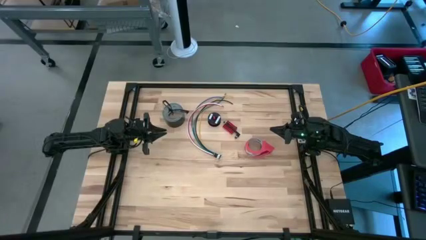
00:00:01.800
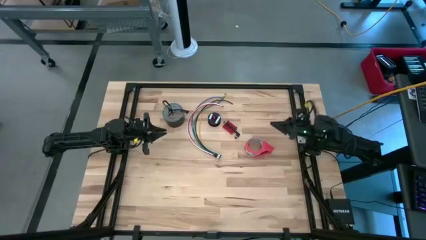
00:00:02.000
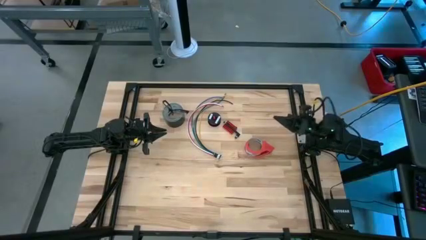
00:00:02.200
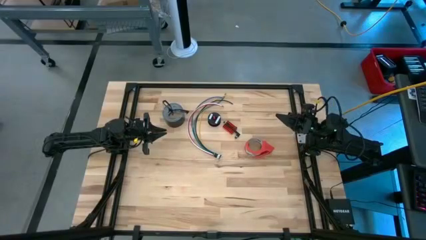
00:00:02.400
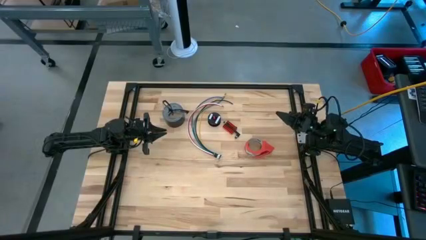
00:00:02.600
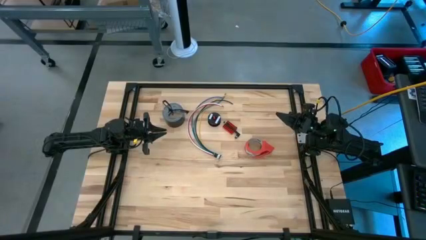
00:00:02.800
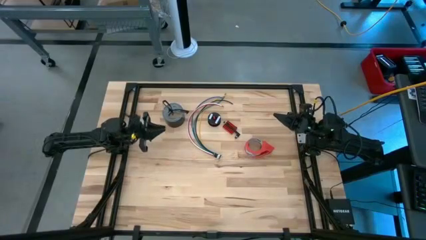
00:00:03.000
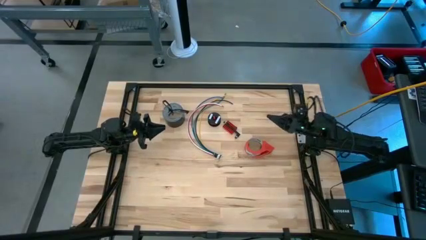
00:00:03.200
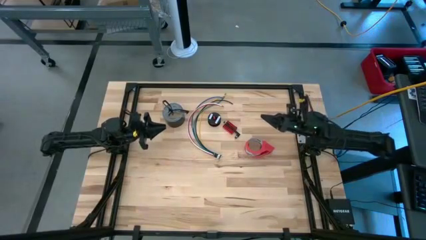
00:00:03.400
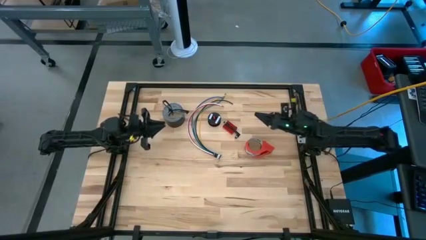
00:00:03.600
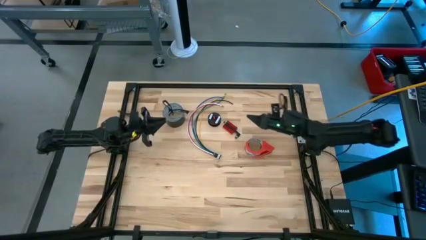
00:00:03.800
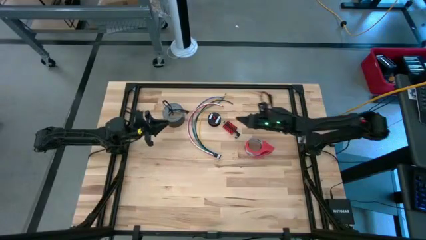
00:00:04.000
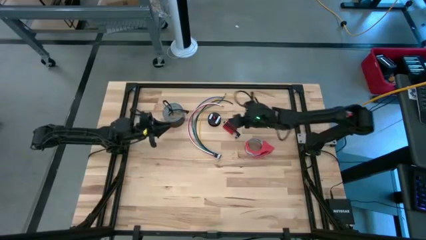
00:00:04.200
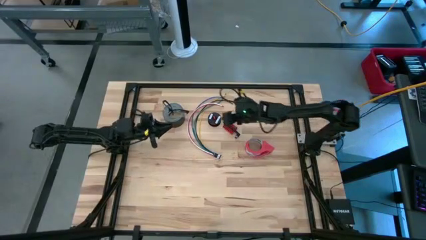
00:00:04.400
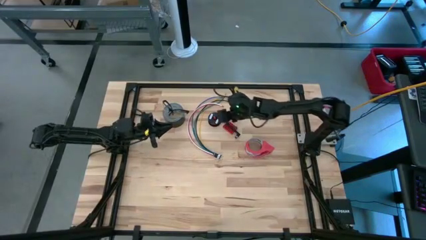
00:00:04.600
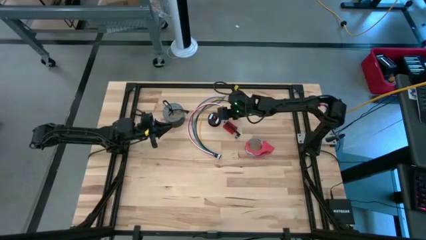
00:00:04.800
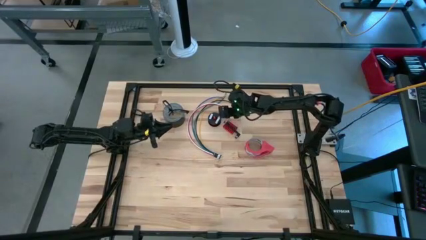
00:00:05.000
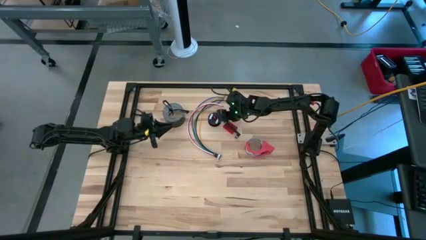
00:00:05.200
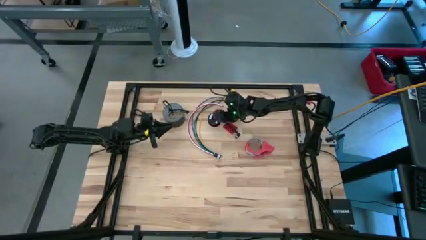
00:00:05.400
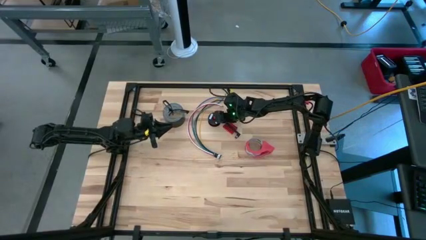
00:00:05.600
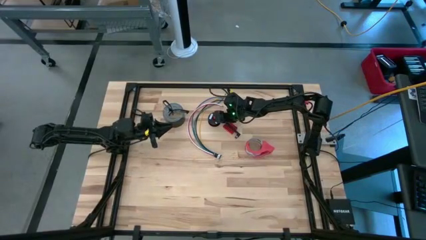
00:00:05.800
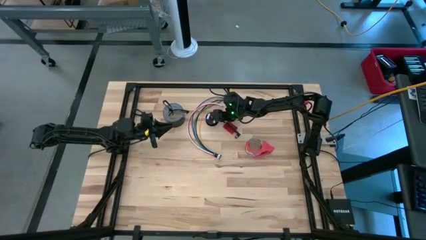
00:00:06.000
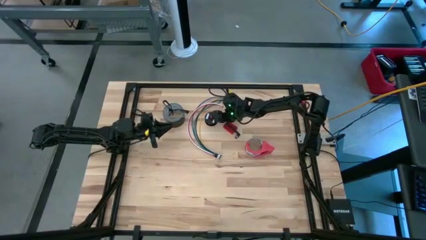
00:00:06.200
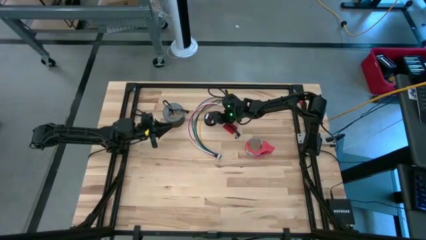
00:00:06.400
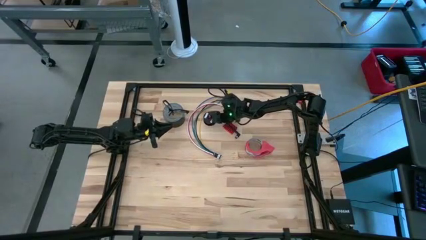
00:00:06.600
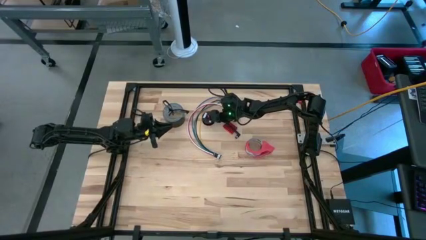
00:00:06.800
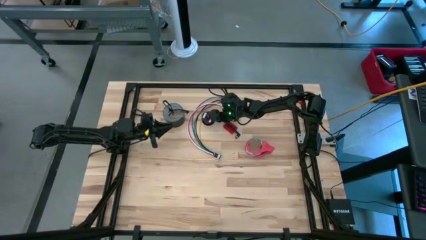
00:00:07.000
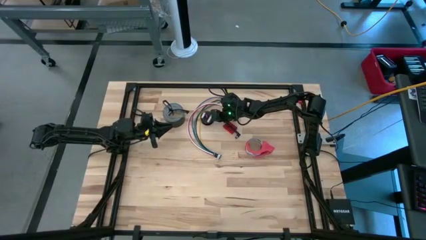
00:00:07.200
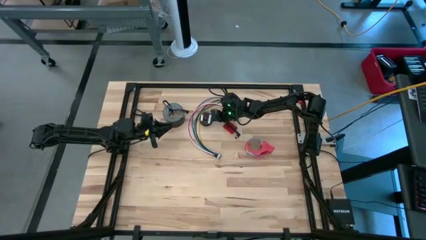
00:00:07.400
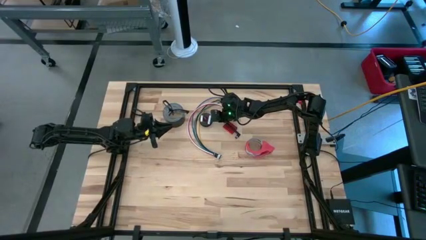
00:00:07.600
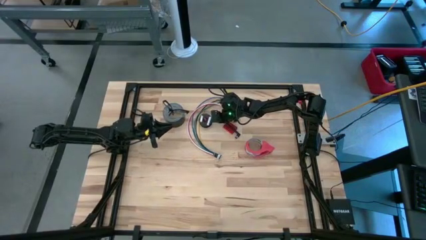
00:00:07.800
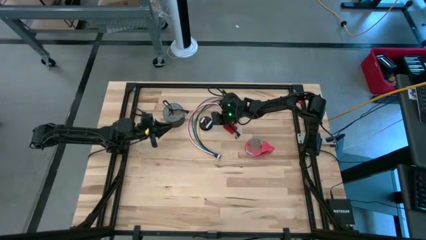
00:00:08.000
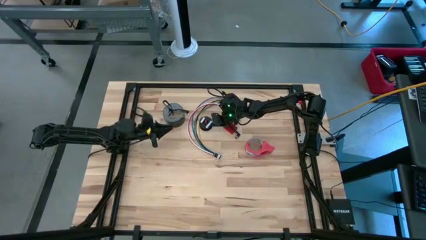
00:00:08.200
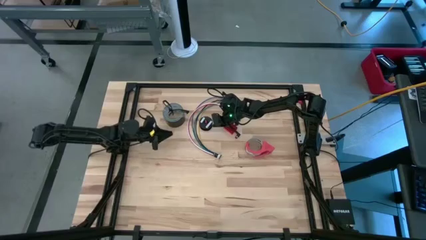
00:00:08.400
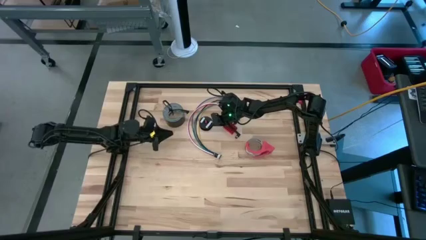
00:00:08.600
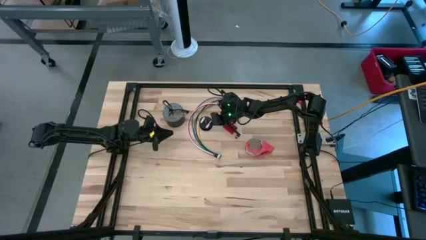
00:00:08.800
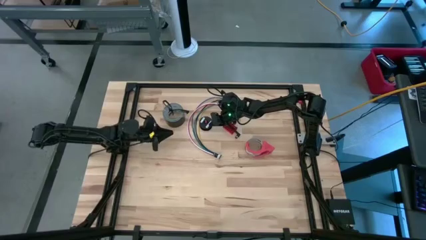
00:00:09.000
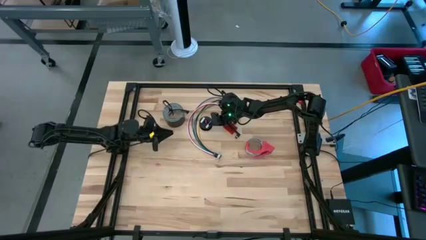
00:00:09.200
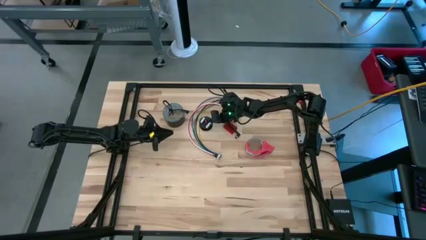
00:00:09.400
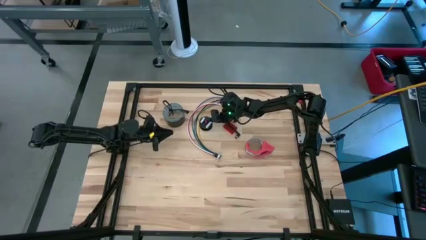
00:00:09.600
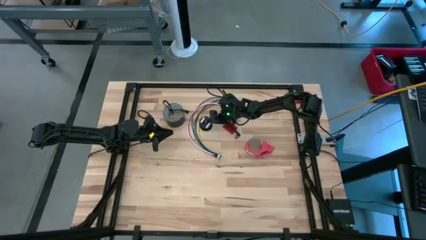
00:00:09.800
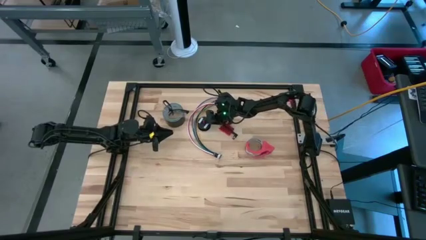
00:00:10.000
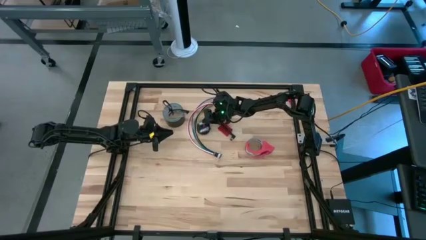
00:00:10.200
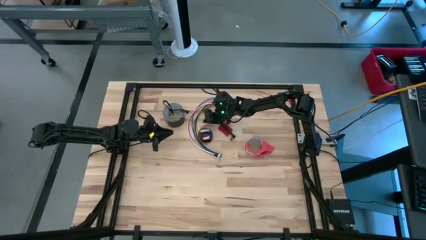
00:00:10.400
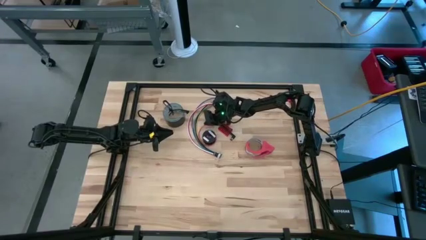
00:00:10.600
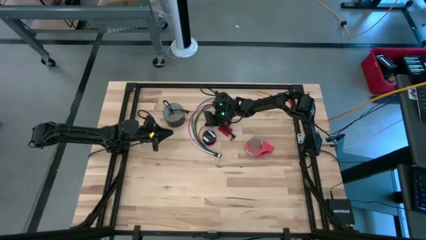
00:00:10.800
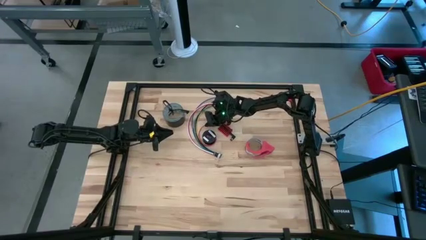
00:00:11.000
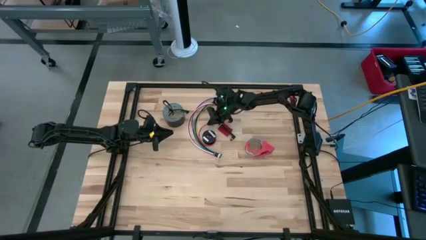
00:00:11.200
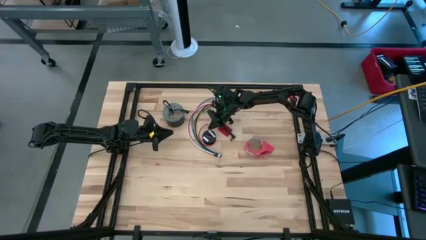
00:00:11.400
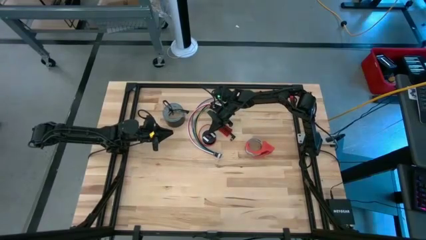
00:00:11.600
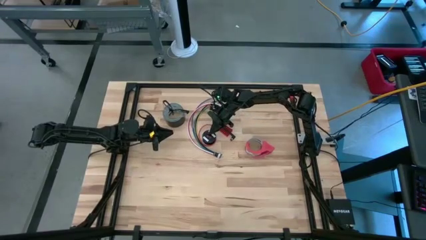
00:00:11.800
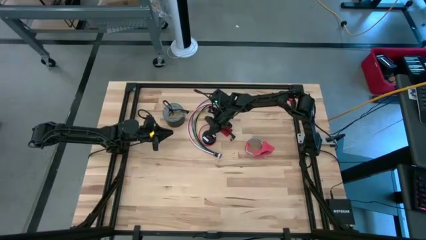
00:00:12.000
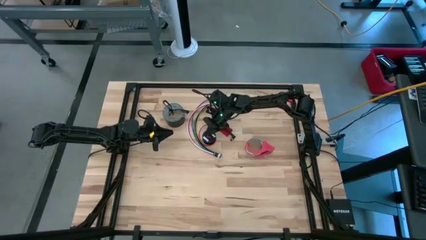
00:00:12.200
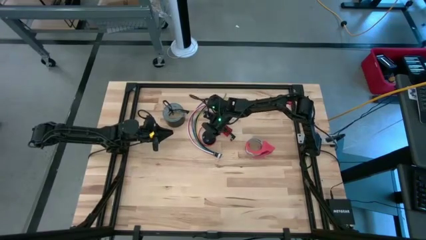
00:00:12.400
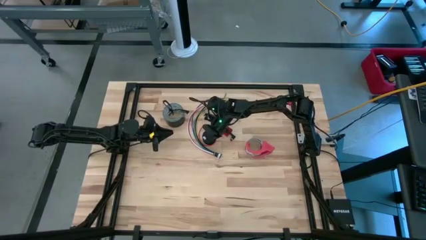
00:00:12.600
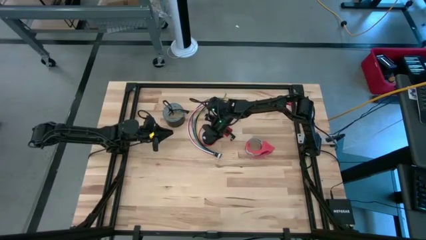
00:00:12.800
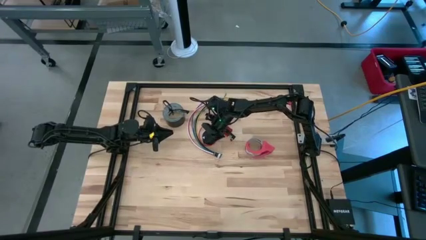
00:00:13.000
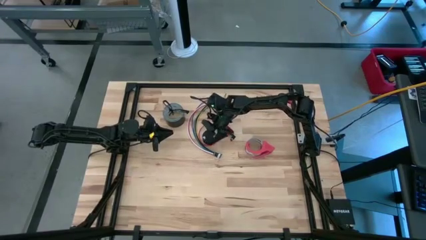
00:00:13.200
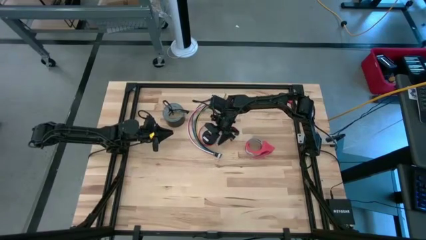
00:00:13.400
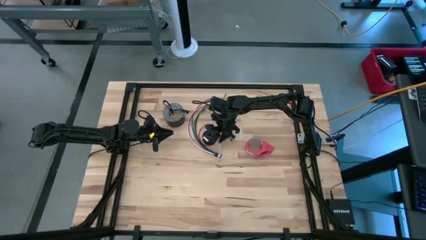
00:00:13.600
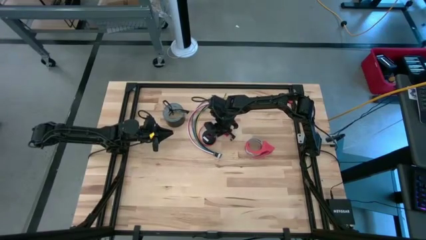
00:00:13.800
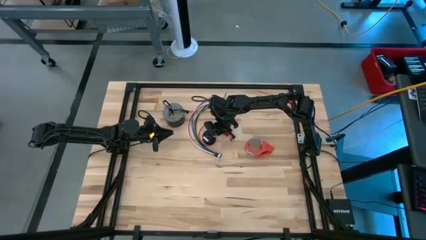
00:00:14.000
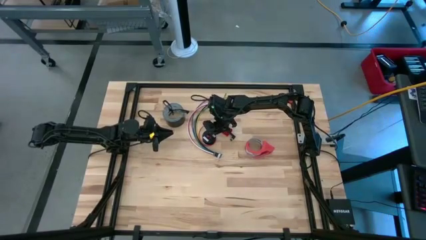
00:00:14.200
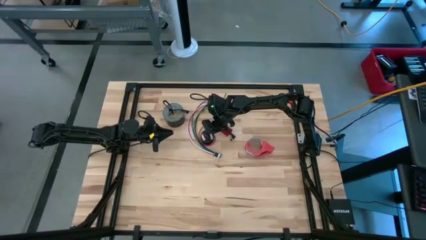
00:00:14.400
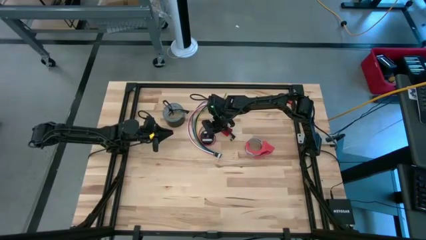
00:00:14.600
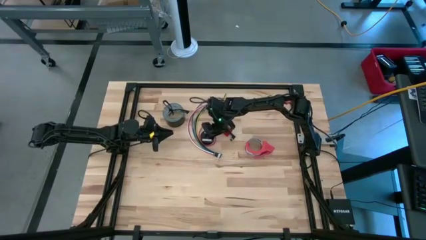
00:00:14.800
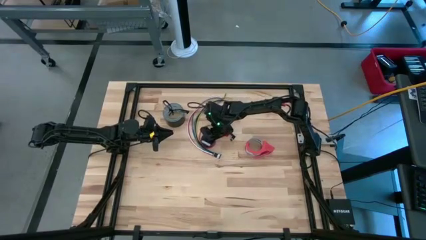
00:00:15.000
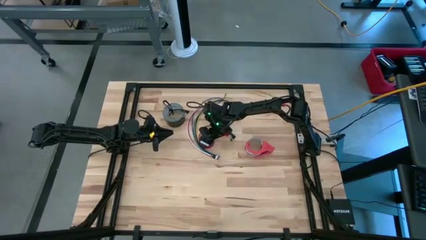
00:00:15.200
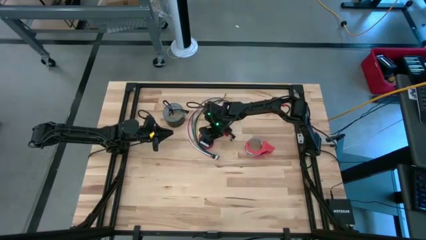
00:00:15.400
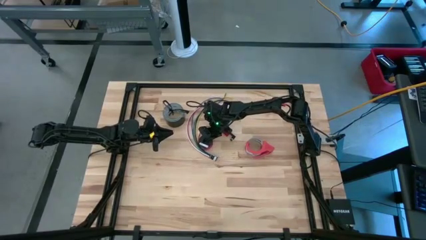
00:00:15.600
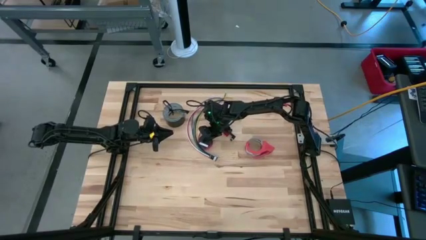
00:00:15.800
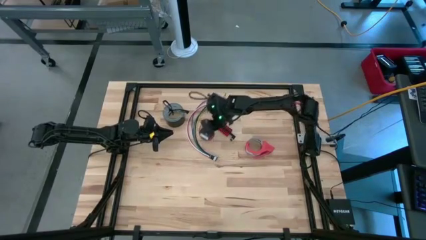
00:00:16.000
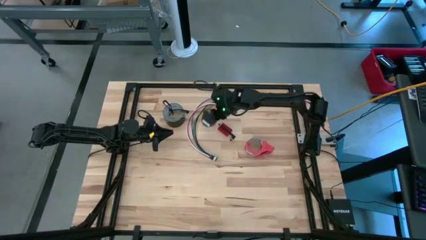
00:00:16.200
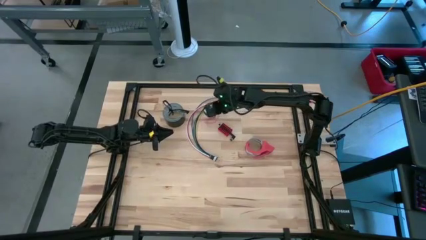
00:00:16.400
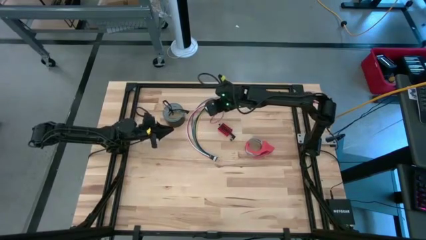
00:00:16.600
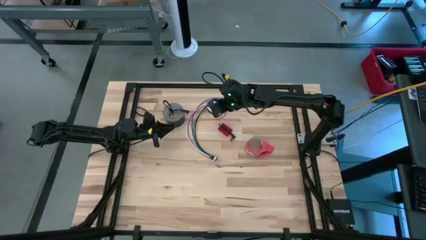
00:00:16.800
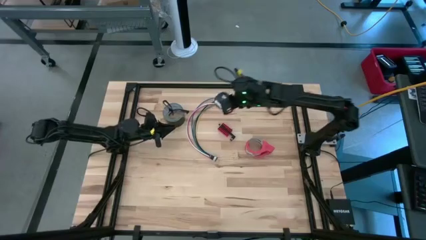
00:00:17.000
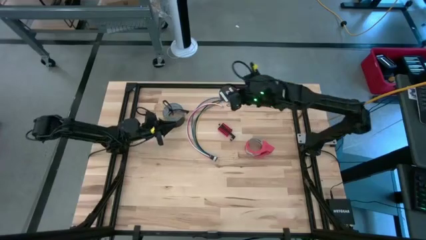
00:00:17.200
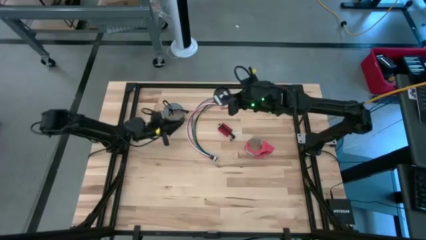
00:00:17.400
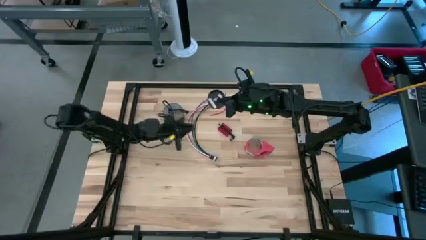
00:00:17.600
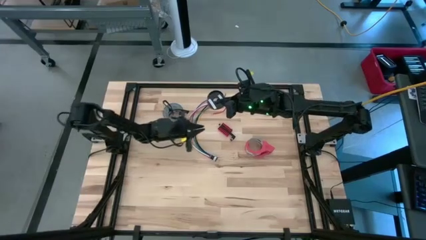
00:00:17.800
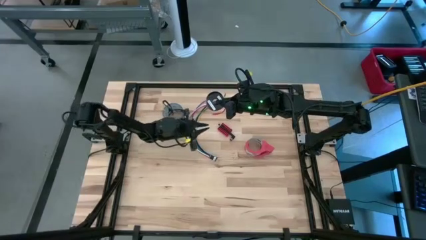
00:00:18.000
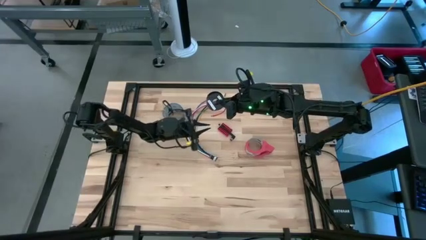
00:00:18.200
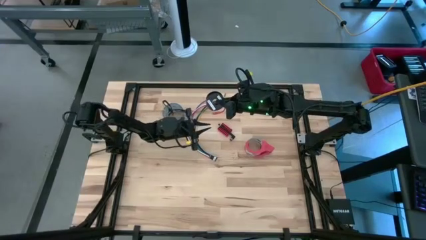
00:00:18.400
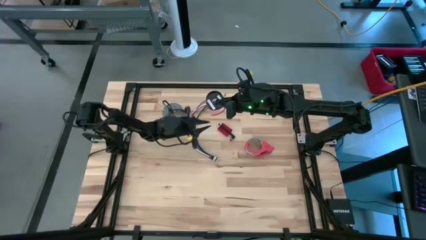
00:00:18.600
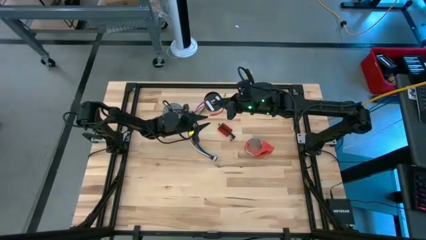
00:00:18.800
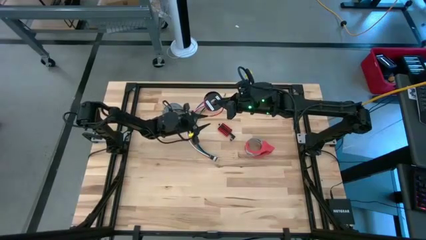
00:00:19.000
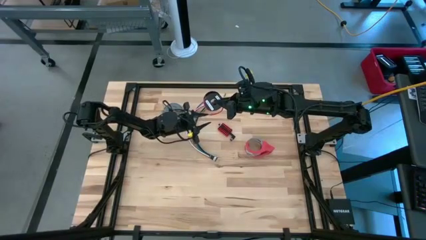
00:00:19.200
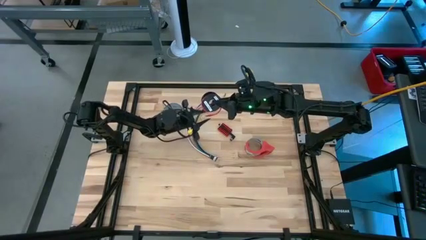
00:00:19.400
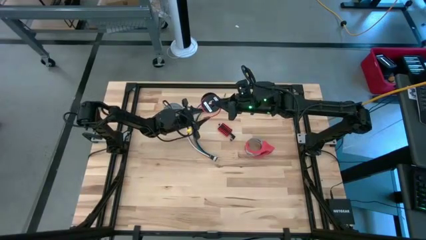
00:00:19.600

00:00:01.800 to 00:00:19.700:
Task: Coil cords
Uncoil the red wire from the black spool
